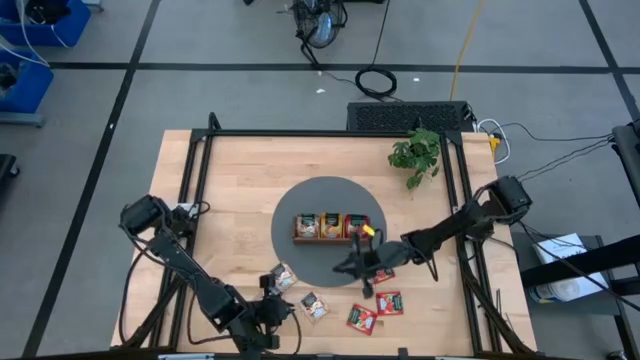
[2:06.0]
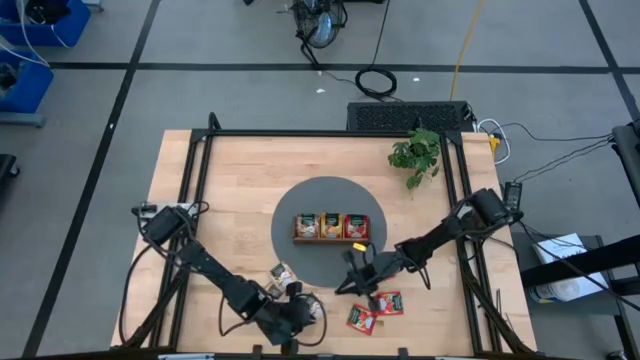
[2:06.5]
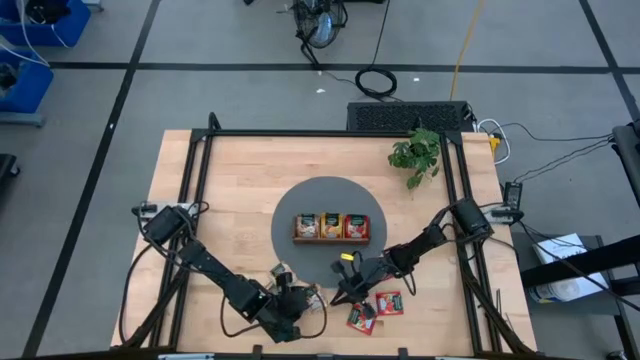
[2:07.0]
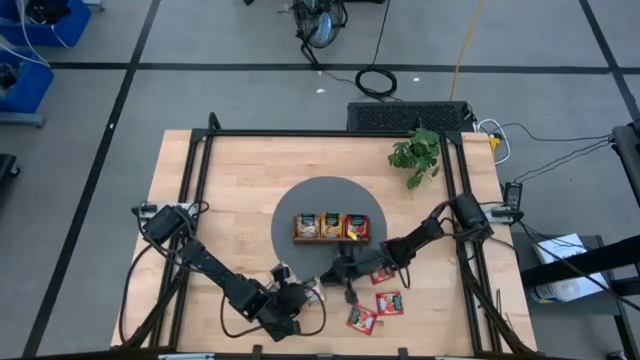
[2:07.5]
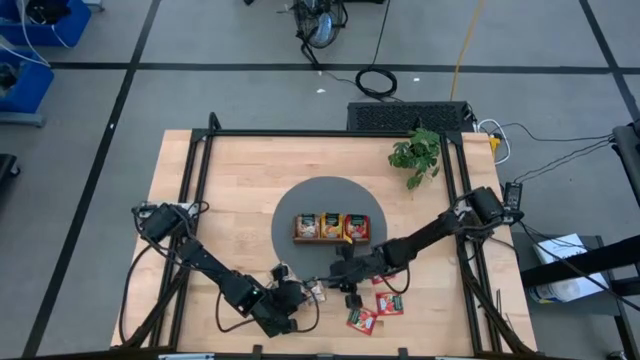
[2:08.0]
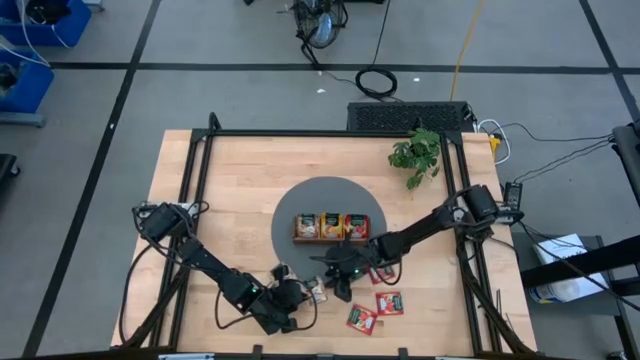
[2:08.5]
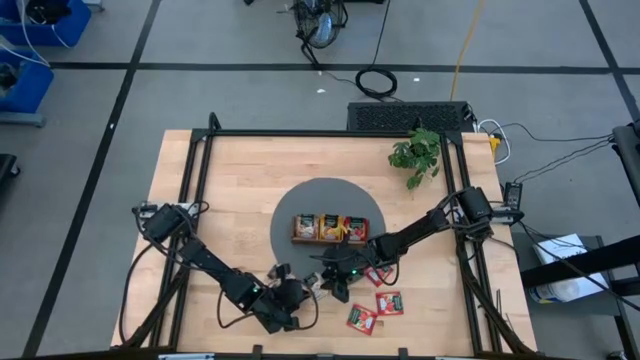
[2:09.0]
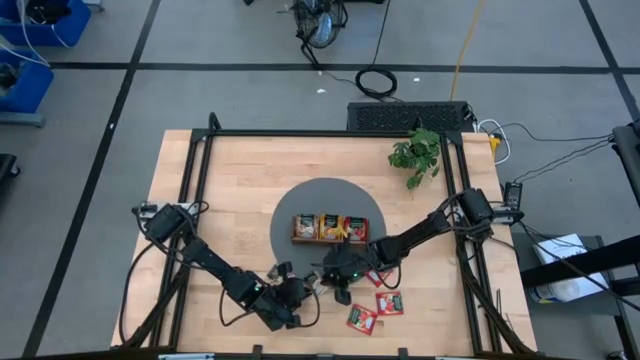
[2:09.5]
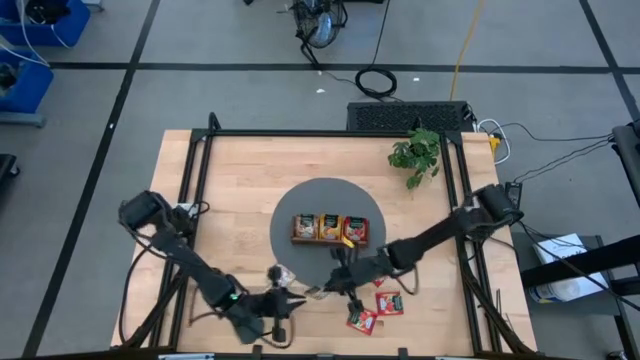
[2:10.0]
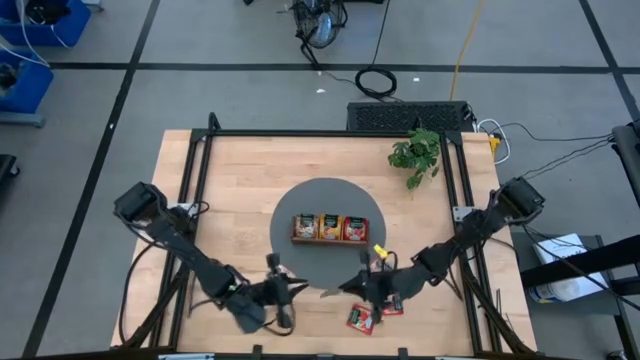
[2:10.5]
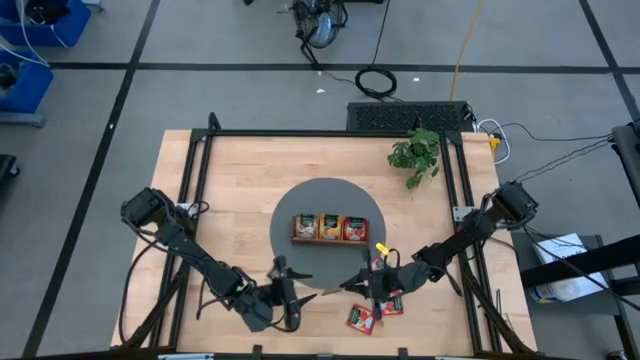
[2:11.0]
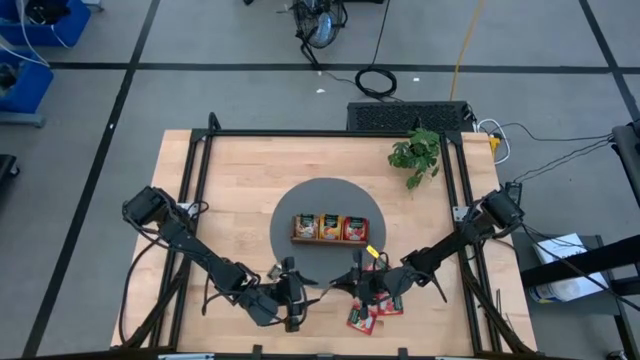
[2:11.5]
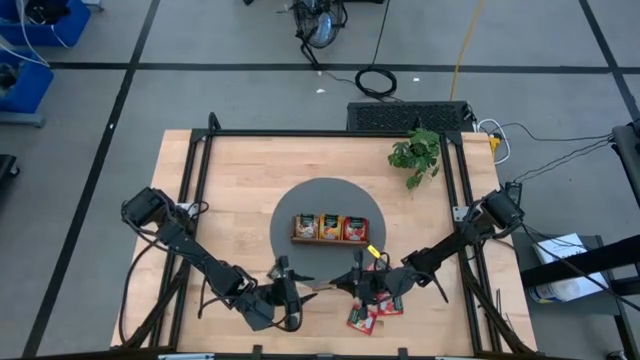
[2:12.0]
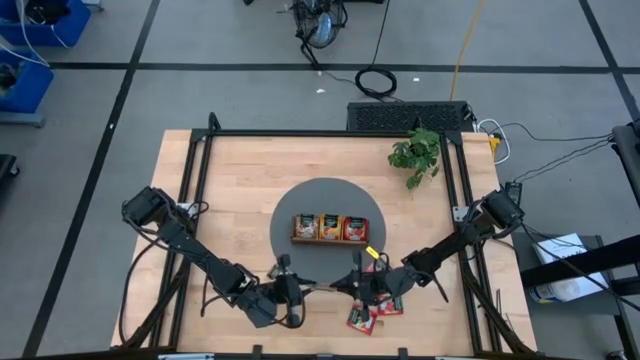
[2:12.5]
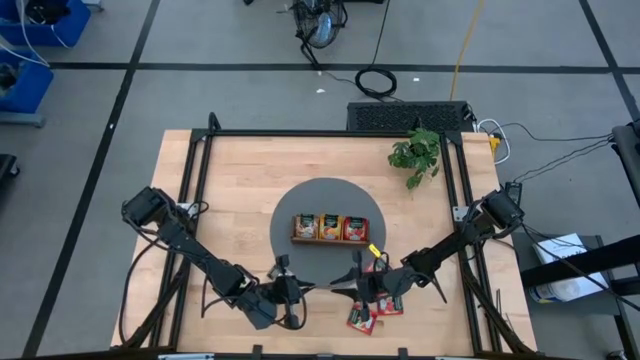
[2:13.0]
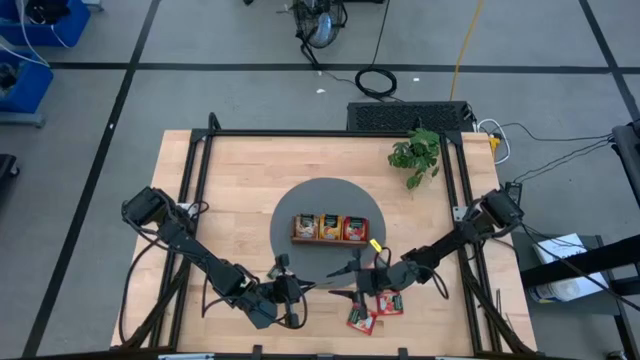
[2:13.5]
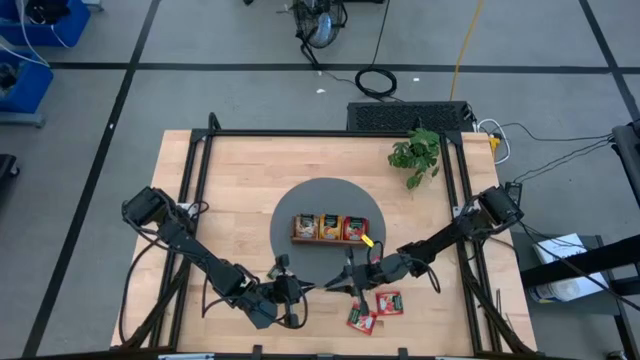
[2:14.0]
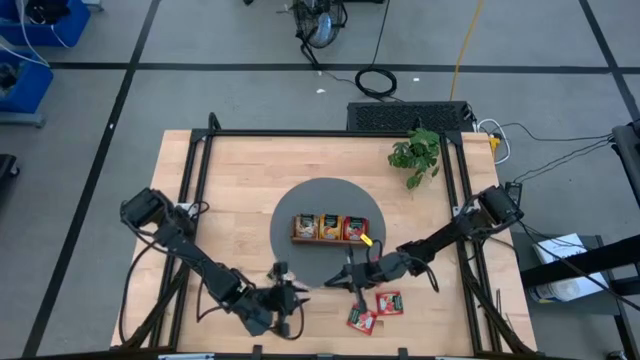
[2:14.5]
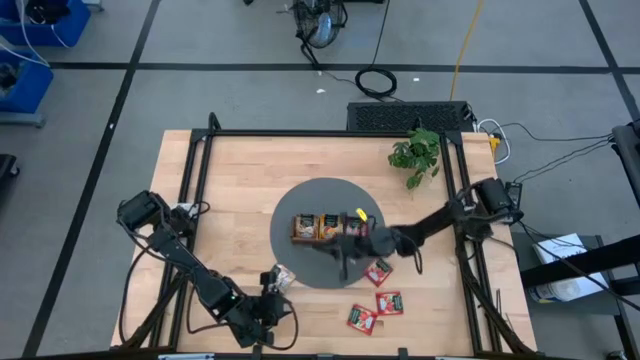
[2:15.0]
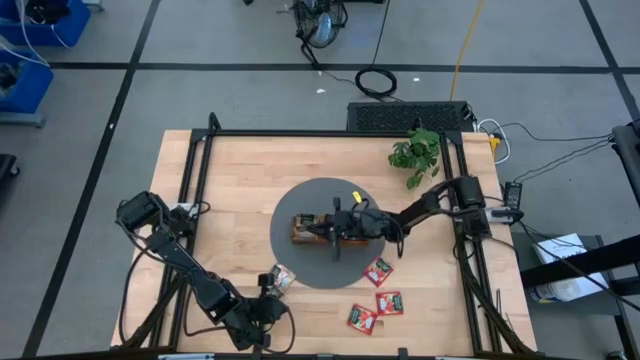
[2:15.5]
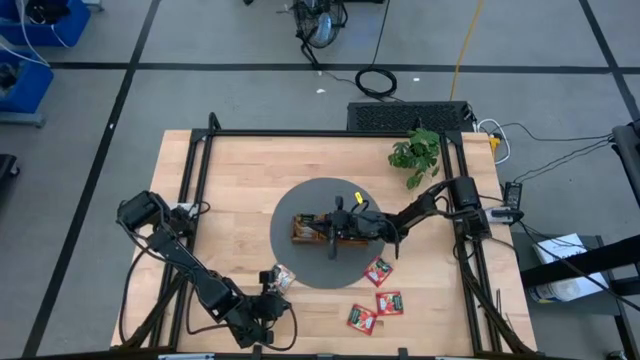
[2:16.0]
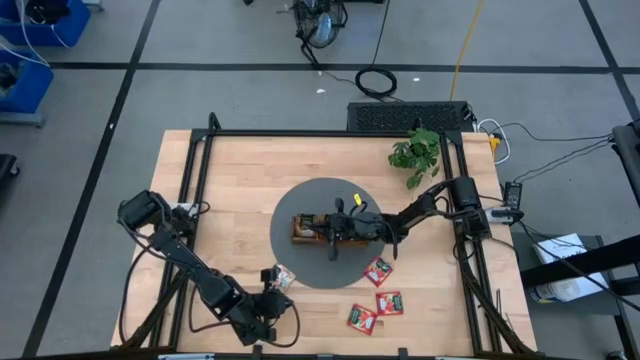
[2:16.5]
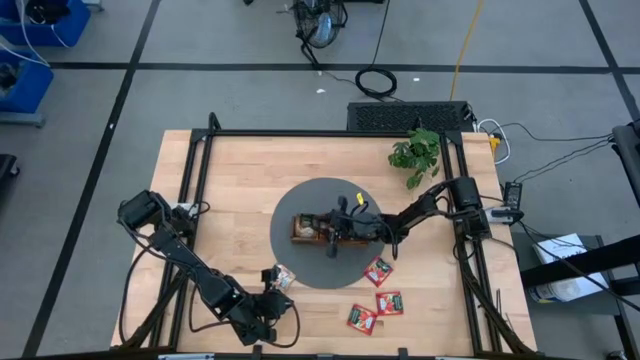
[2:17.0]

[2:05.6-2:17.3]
Task: Pick & Place Tea
Put the brown tea bag into the left section of the wooden organizer

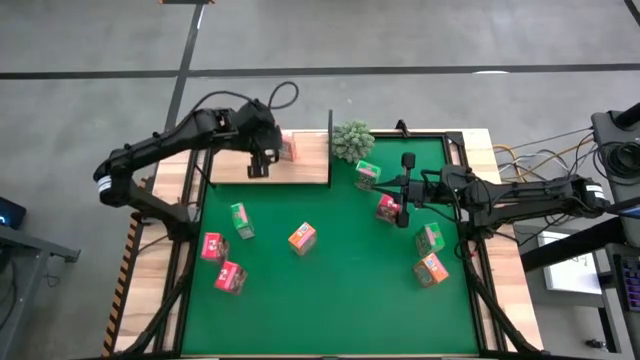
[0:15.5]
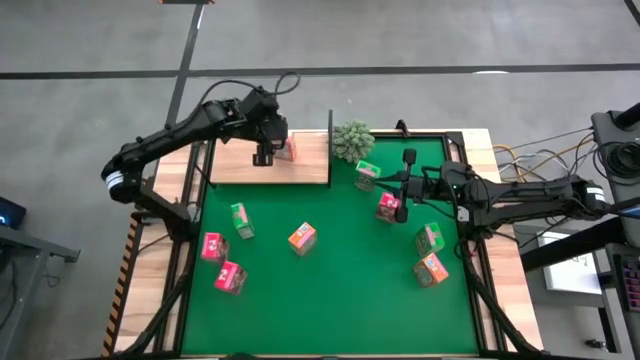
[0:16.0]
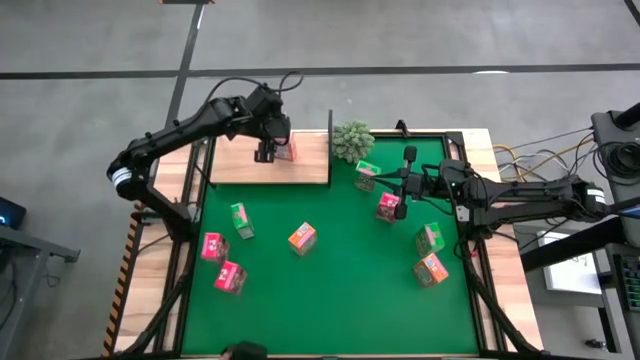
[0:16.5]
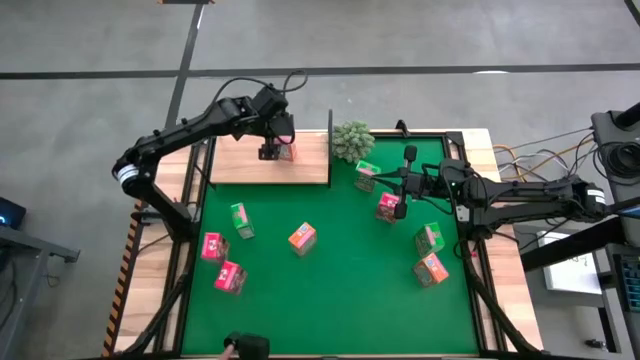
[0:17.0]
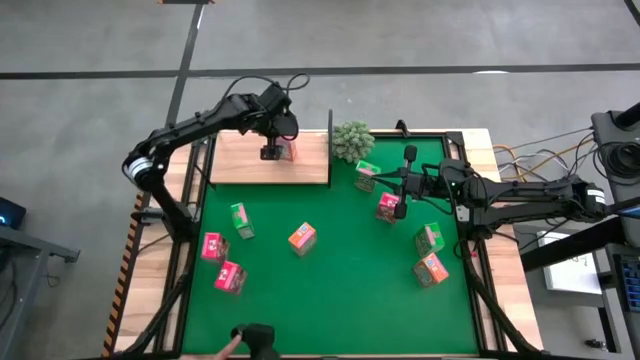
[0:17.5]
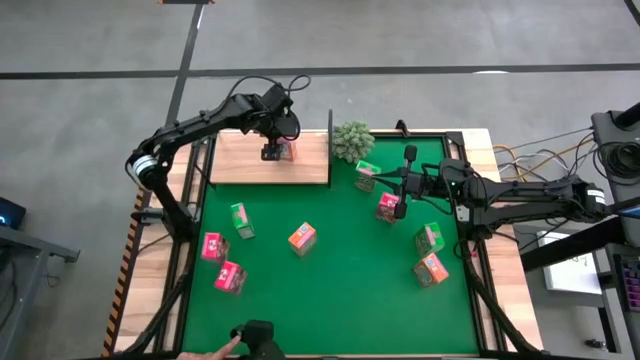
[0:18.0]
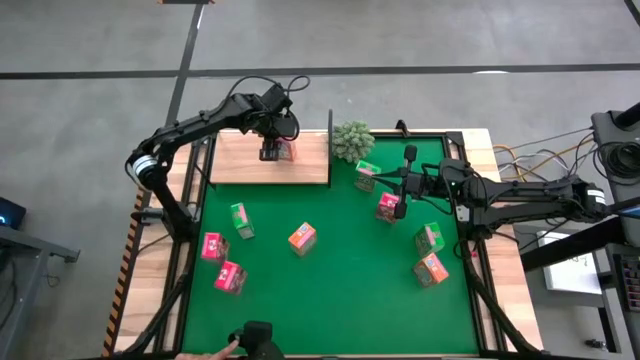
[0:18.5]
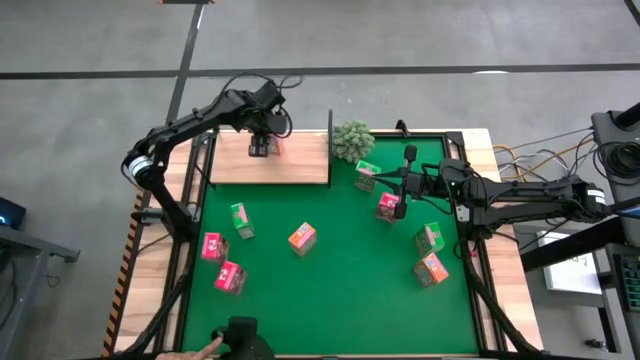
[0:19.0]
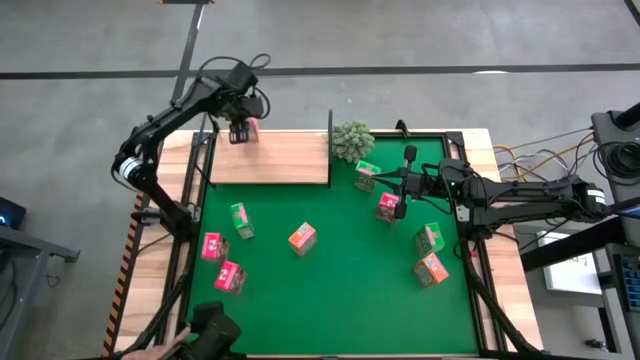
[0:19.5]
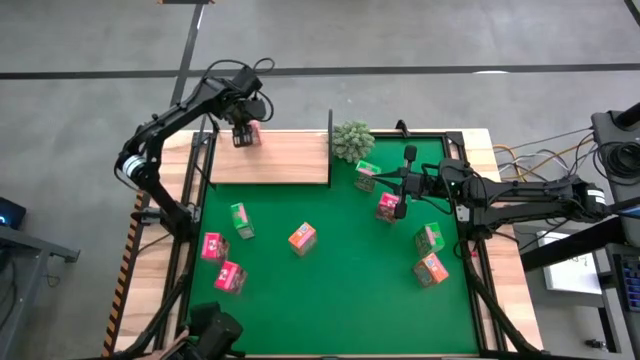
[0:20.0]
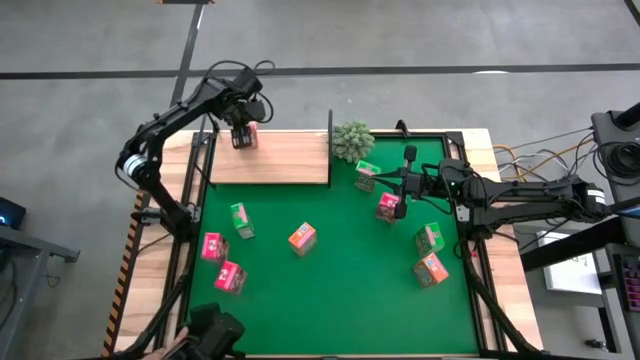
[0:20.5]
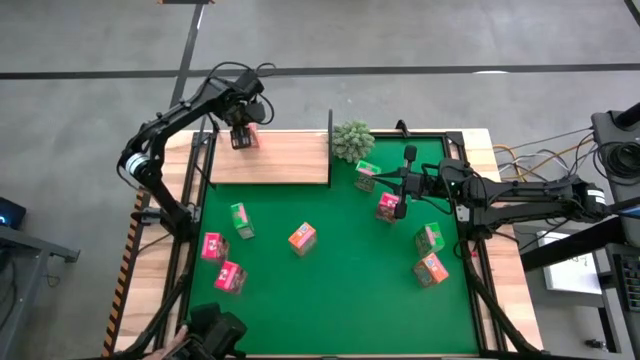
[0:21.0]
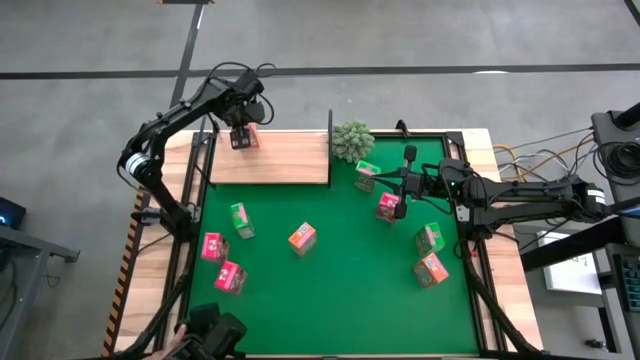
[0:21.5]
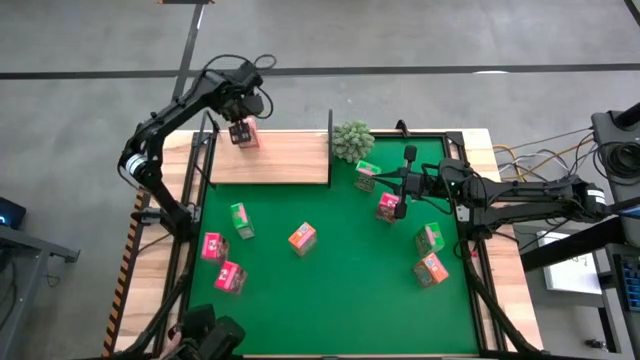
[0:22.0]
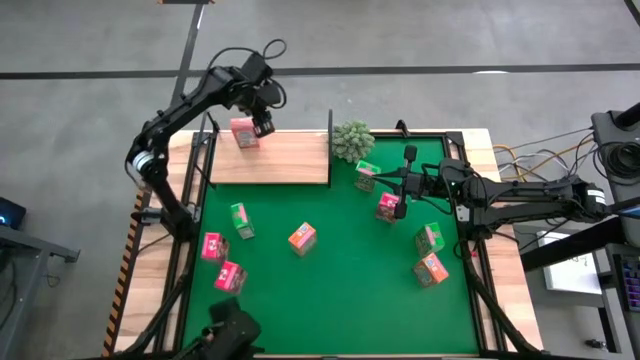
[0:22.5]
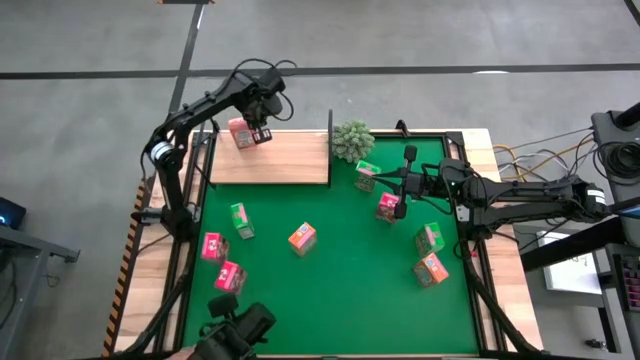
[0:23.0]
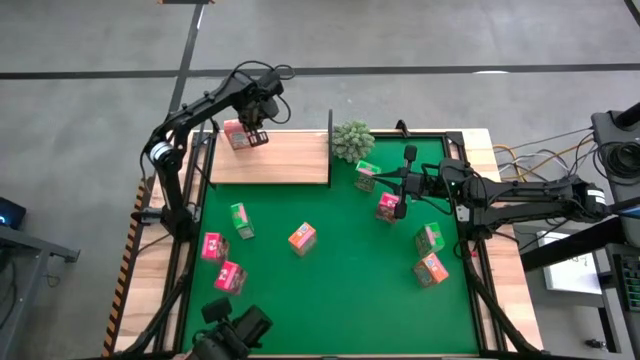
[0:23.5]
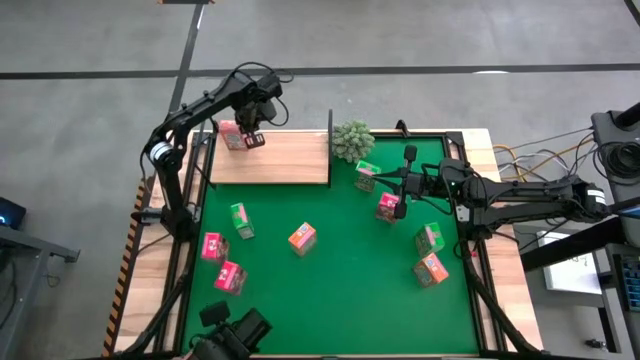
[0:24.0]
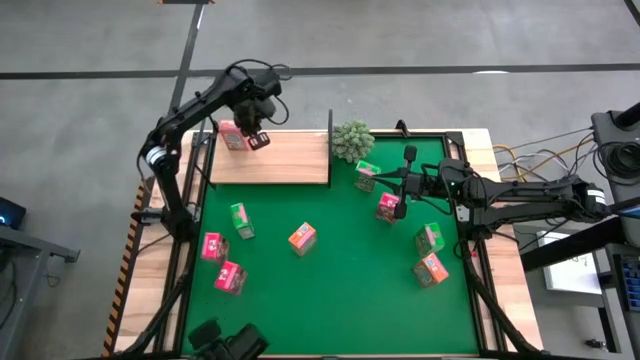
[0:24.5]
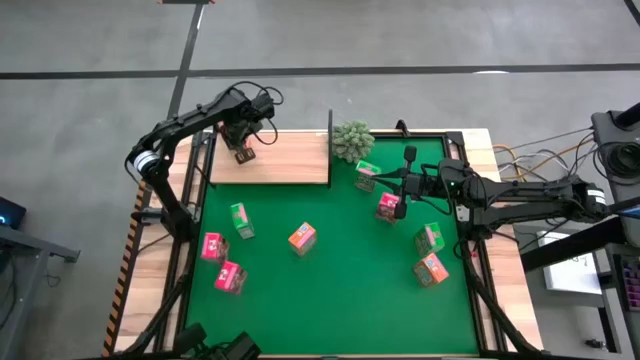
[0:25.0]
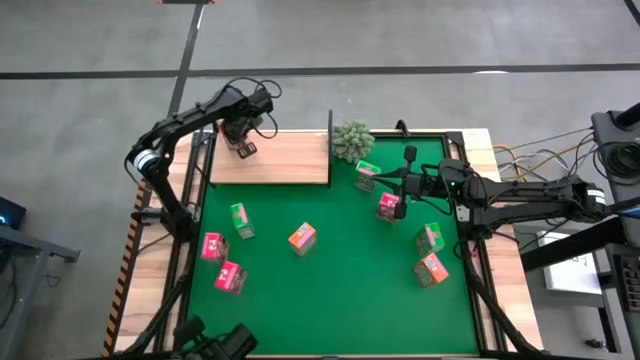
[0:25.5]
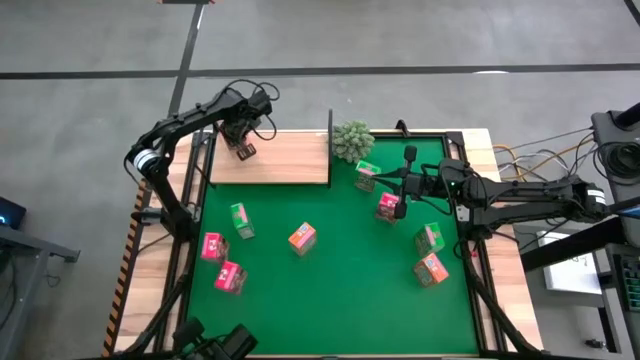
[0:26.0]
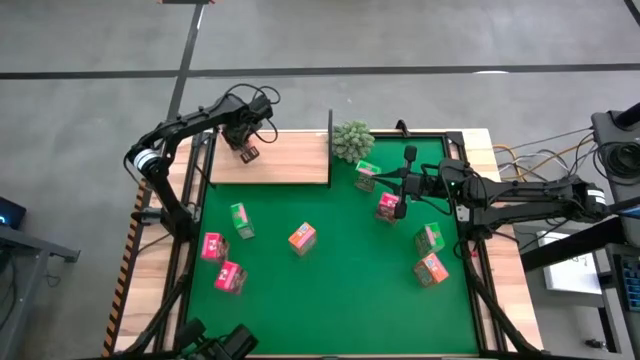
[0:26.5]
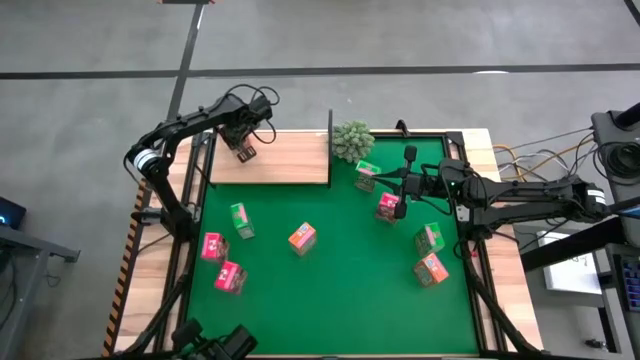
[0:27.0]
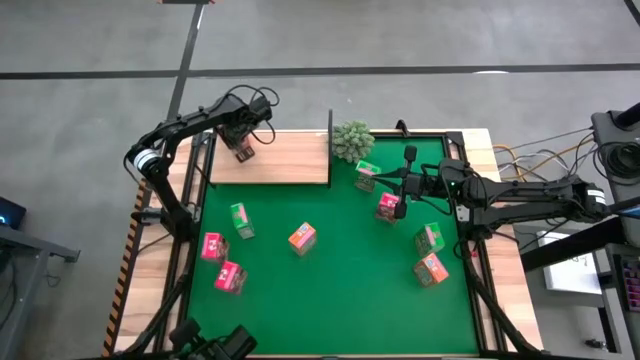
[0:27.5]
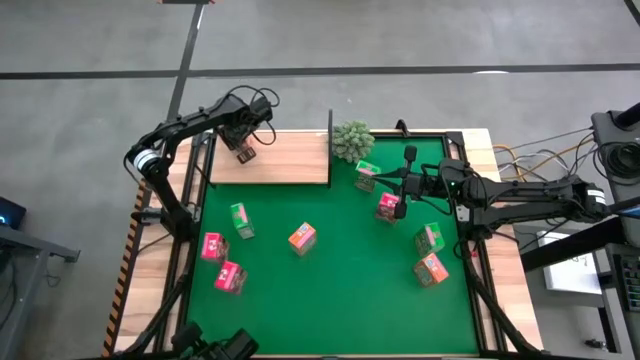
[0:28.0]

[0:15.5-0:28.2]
Task: Stack cereal on shelf
Put the top orange cereal box on the shelf
